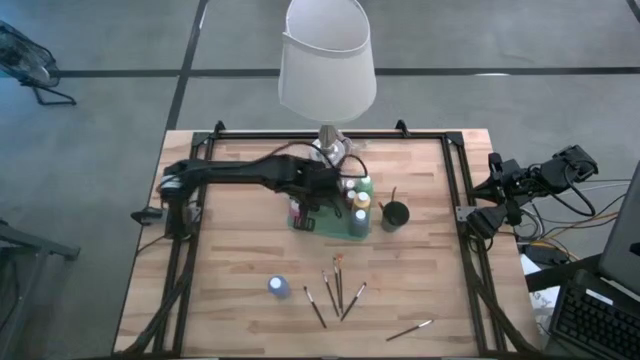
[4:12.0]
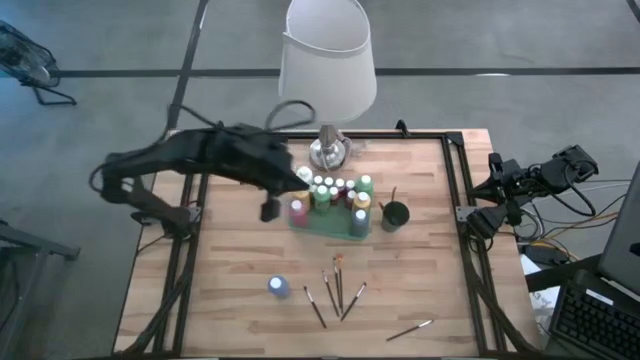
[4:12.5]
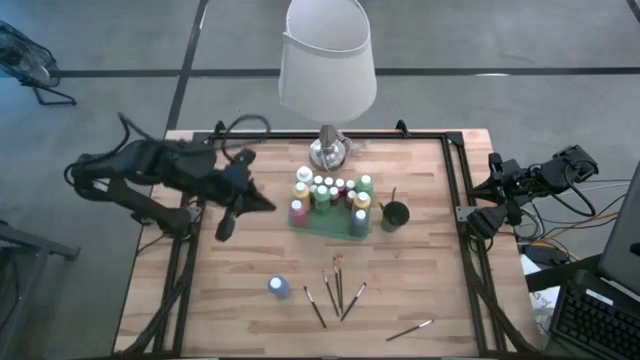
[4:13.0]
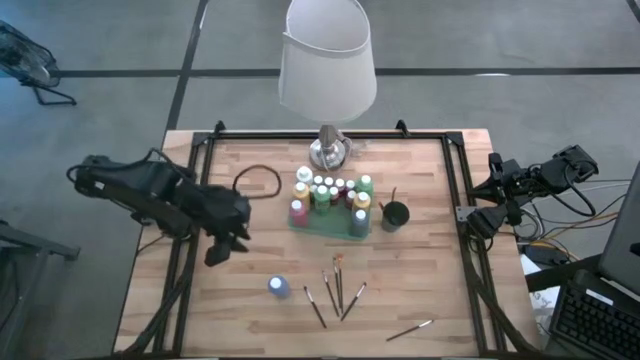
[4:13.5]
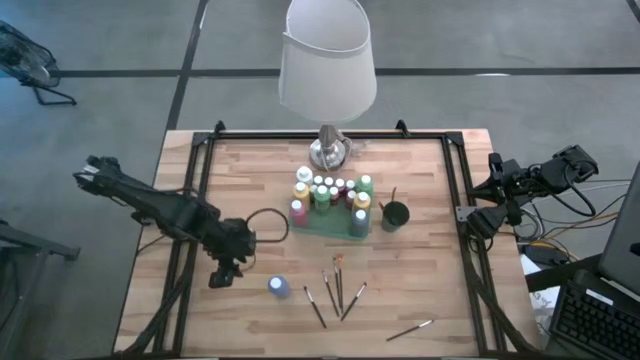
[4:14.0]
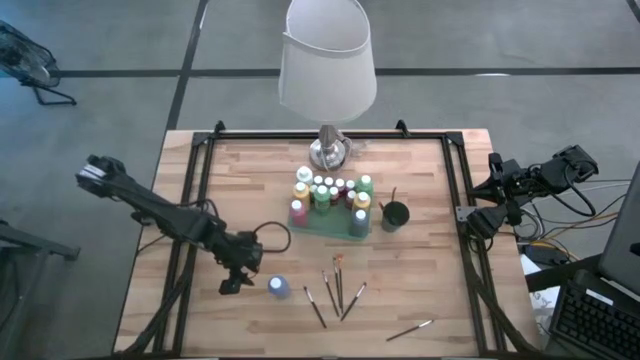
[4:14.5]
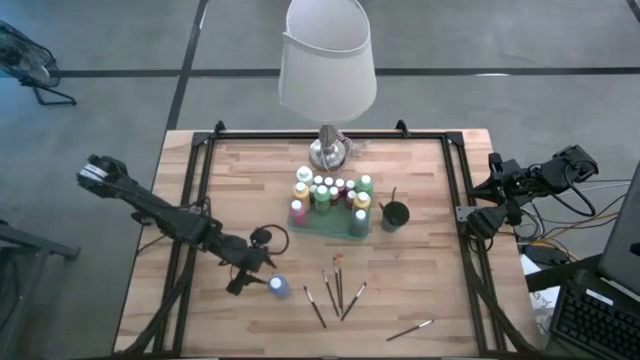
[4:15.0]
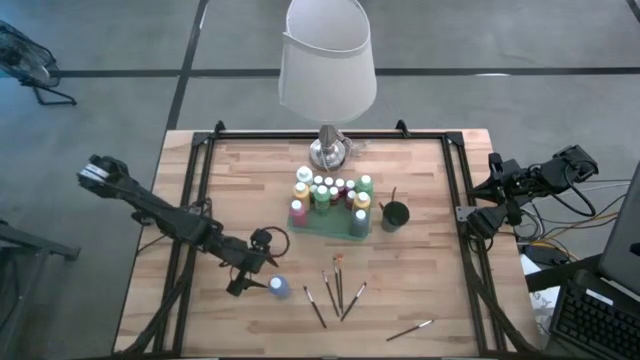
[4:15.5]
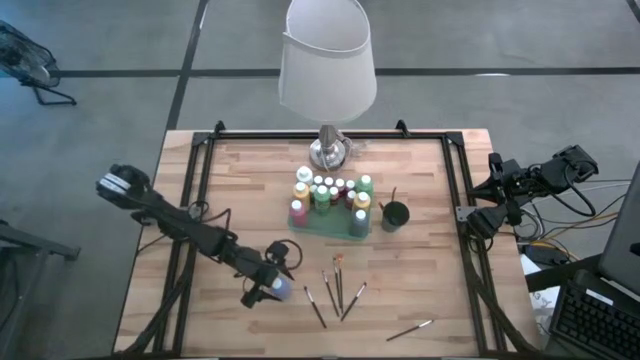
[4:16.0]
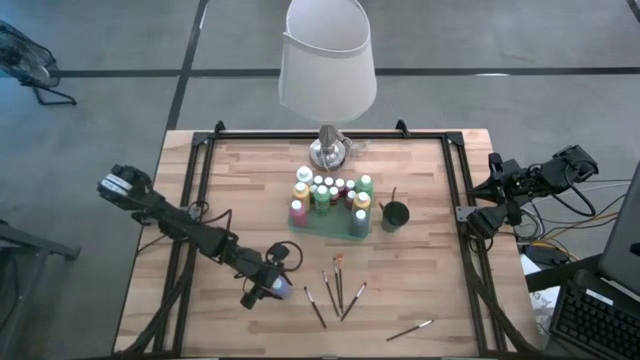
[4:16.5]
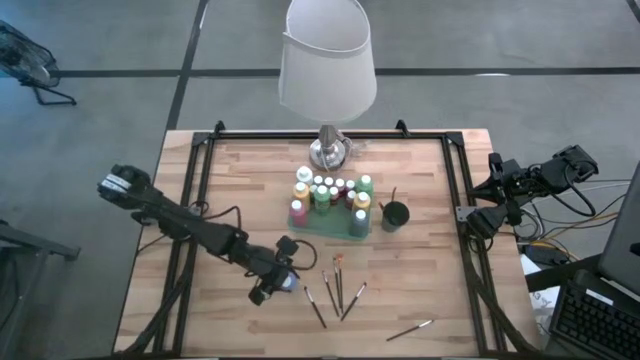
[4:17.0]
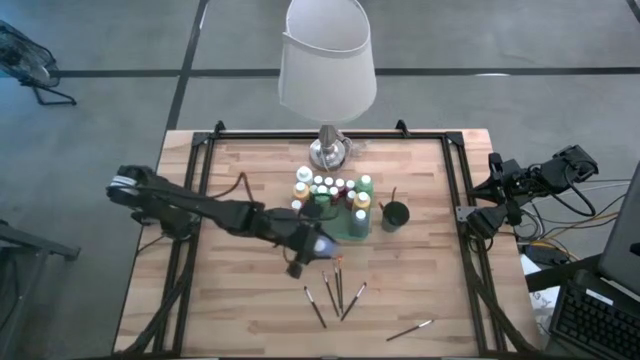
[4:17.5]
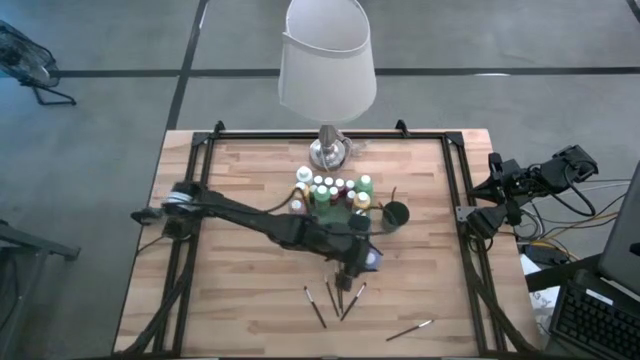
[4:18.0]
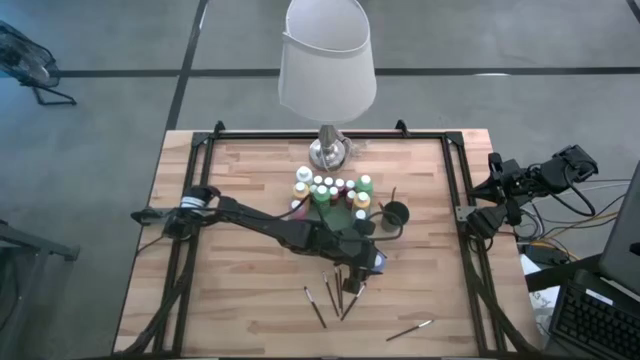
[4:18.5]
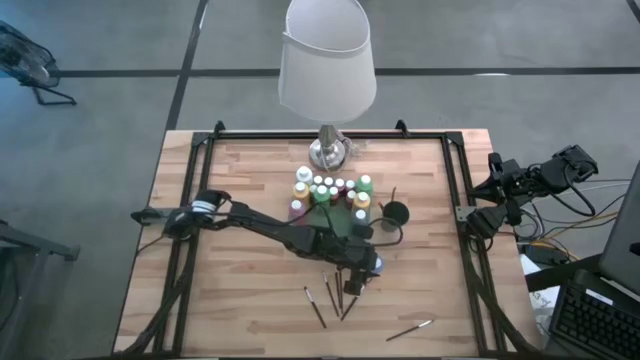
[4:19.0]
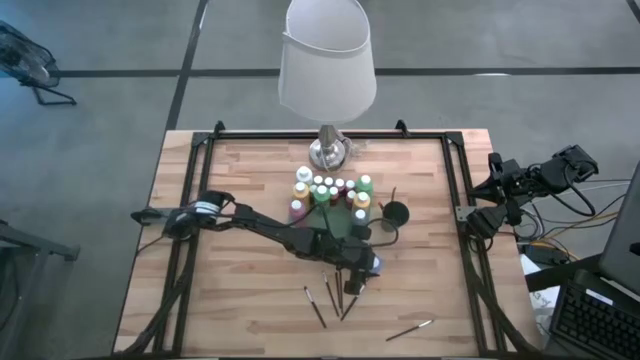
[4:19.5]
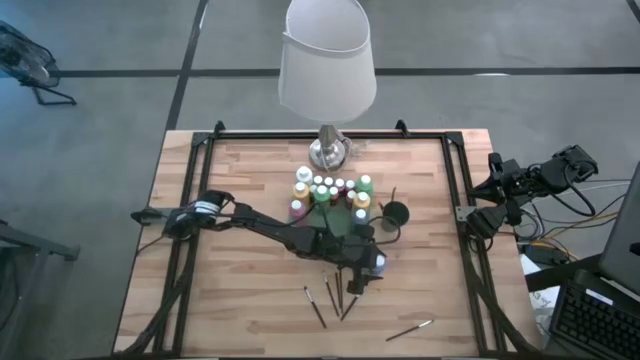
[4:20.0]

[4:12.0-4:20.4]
Task: Pick & Place Paint Supplies
Move the blue paint bottle to the right

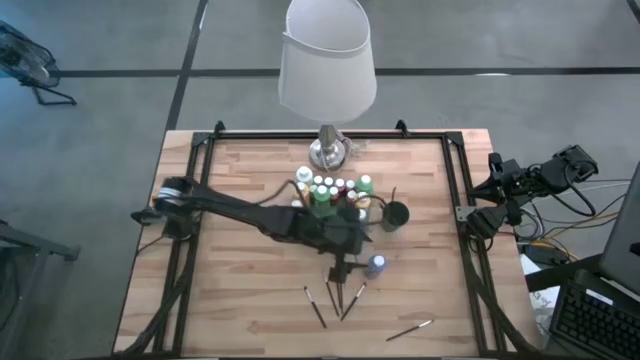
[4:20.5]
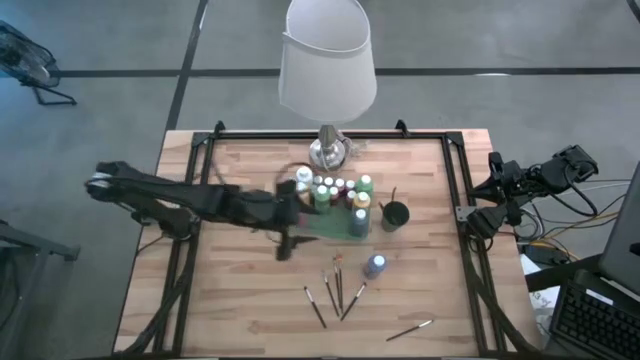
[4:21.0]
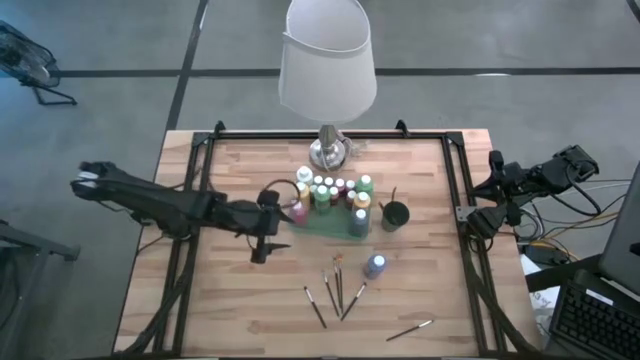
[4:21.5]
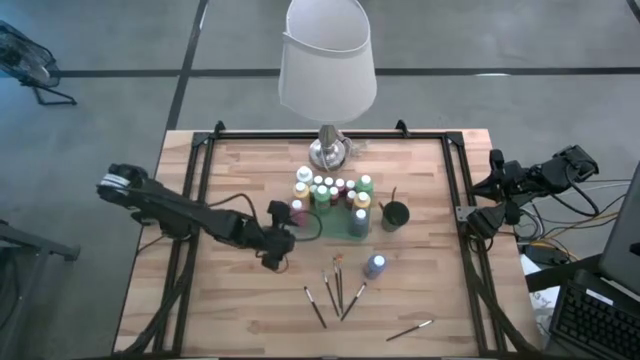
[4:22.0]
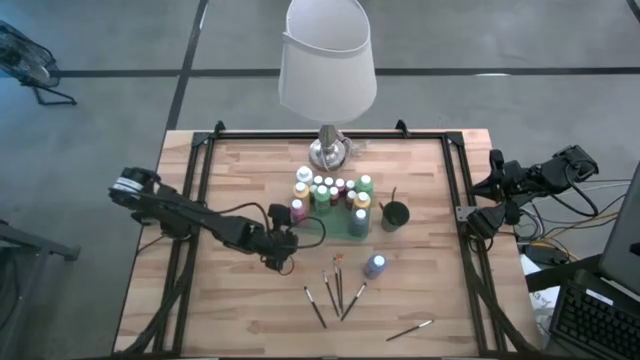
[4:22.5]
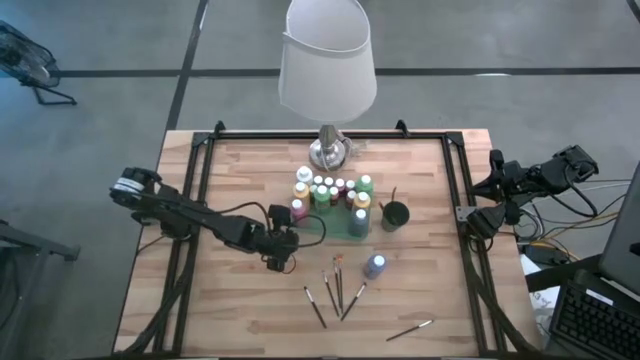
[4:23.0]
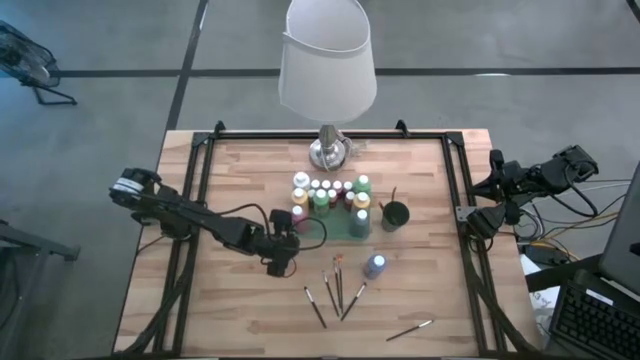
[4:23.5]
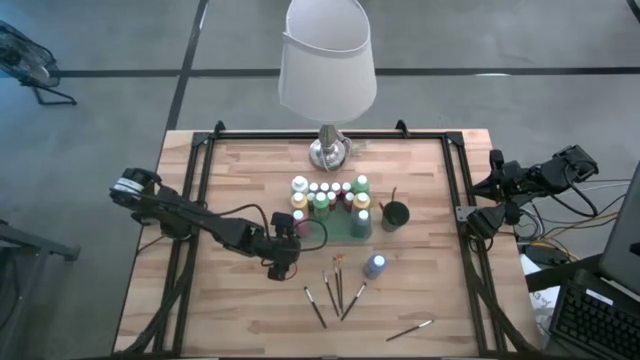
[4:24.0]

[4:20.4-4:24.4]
Adjust the green bin

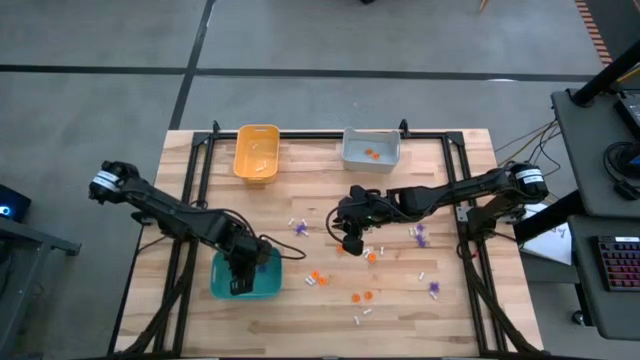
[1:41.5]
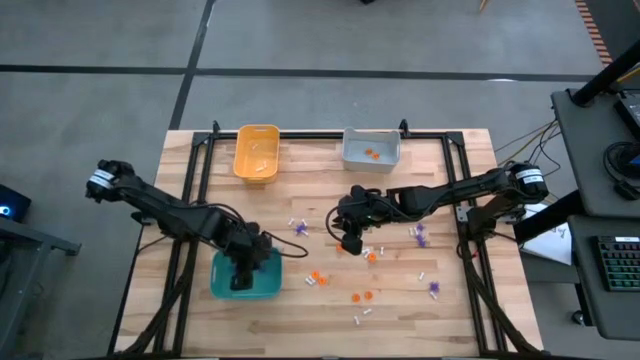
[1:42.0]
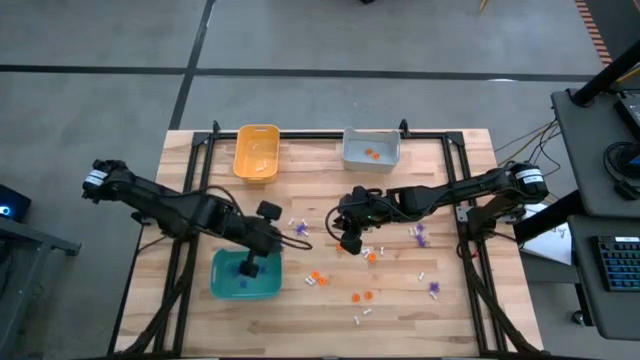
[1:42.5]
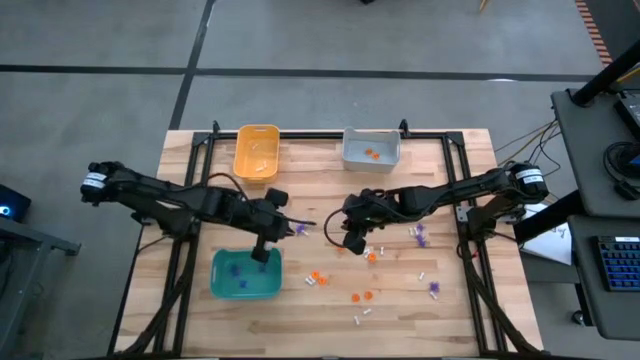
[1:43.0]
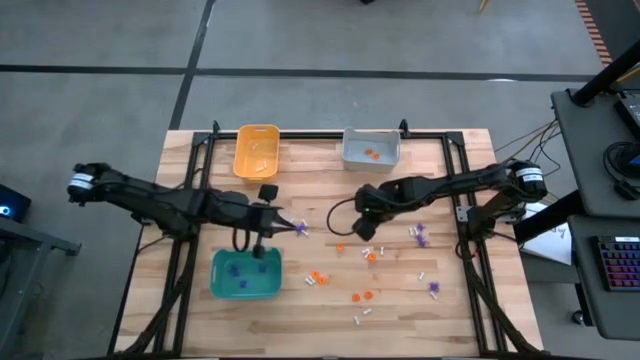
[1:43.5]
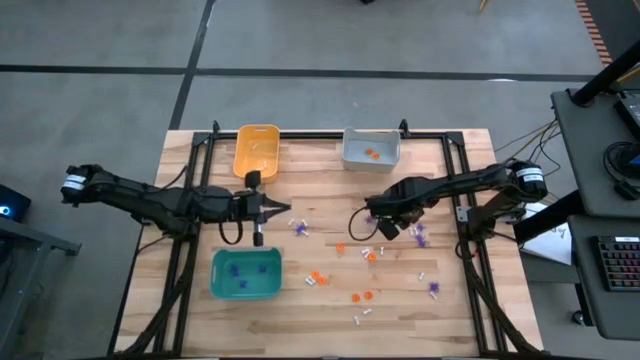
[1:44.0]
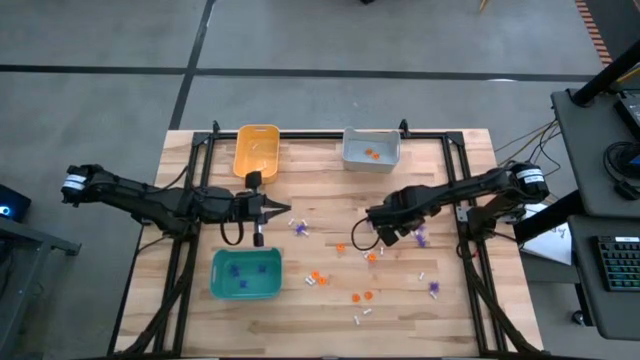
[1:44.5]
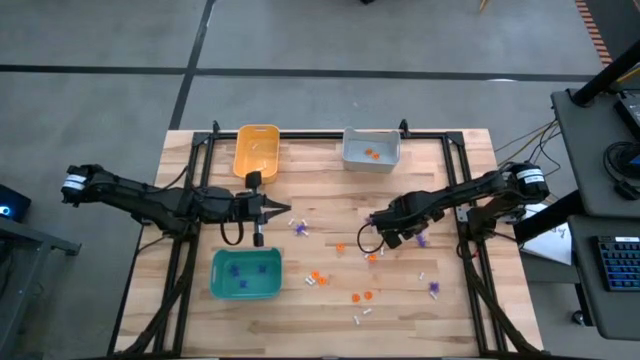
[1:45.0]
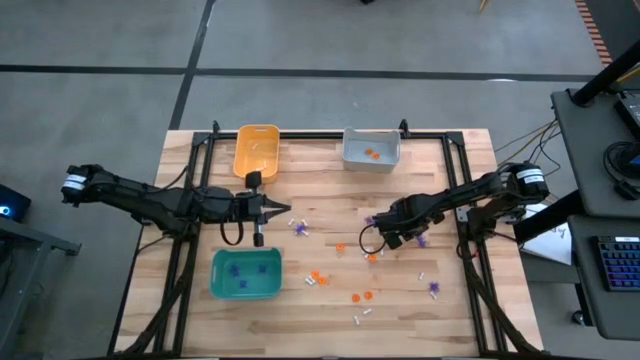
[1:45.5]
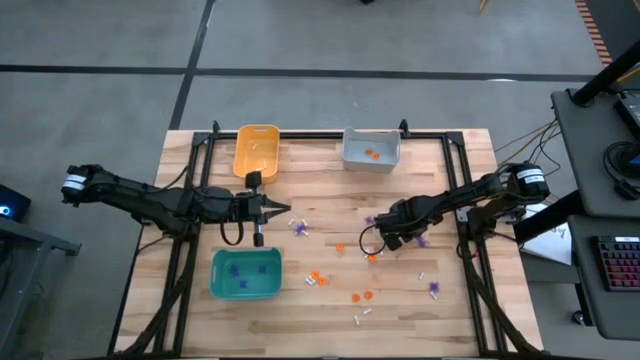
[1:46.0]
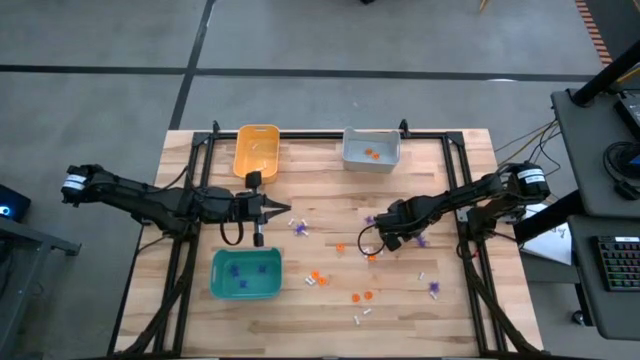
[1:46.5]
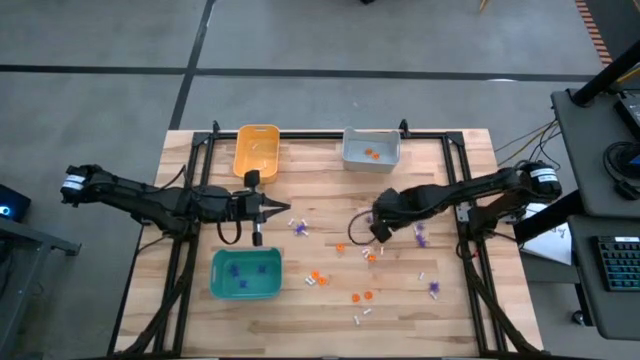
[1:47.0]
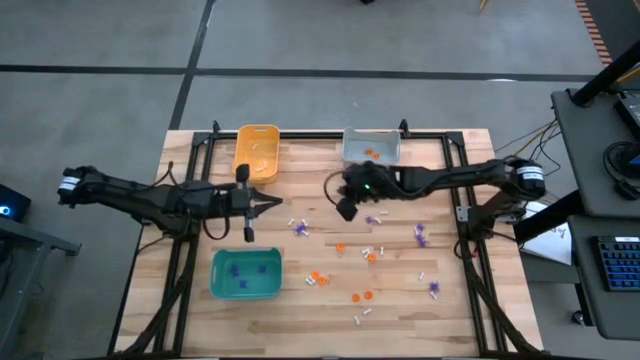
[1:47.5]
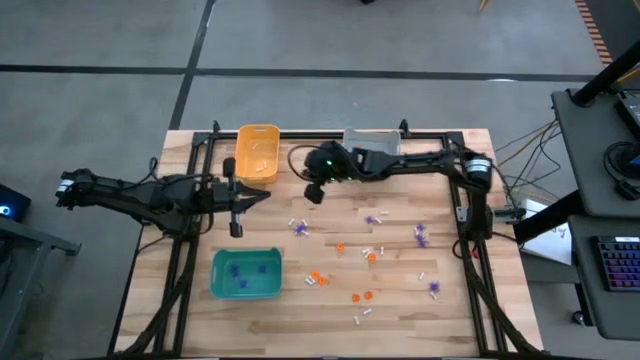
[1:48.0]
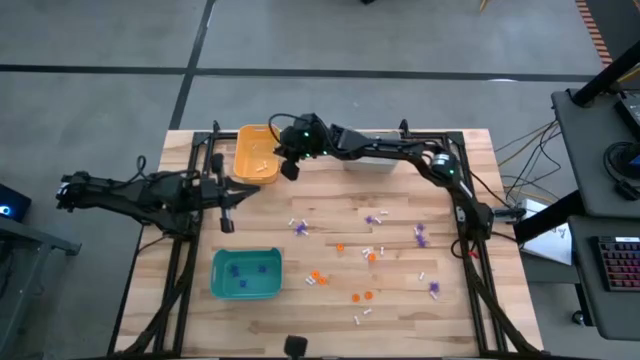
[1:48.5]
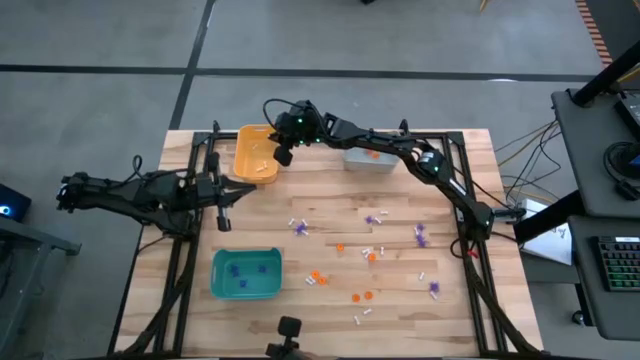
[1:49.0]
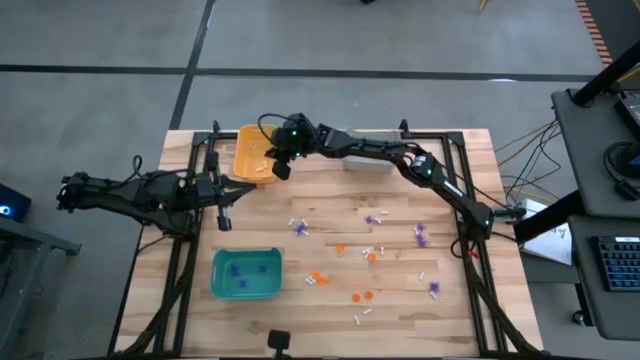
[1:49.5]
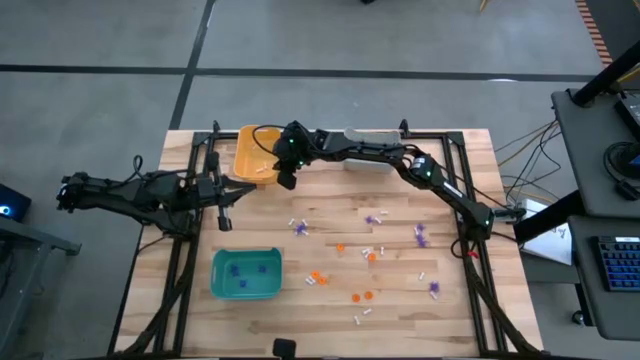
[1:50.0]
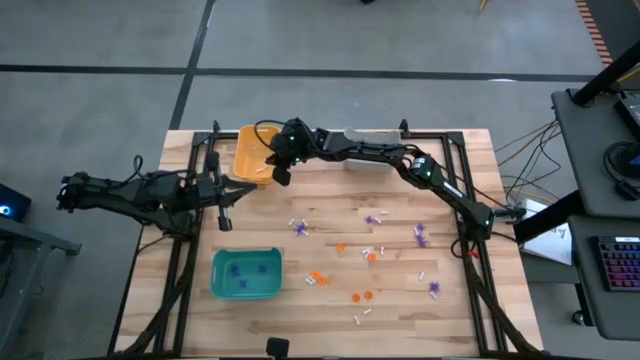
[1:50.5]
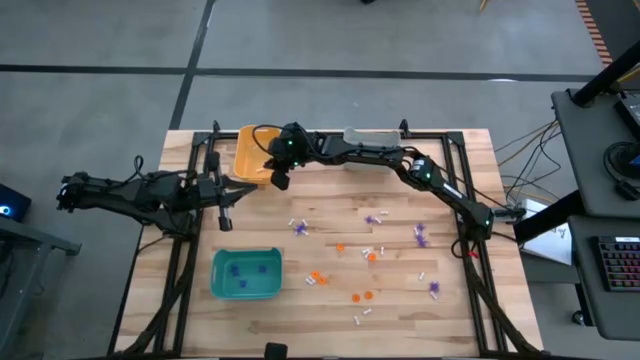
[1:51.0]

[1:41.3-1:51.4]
Task: Sort Halloween decoration
Put the white bone toy into the orange bin
